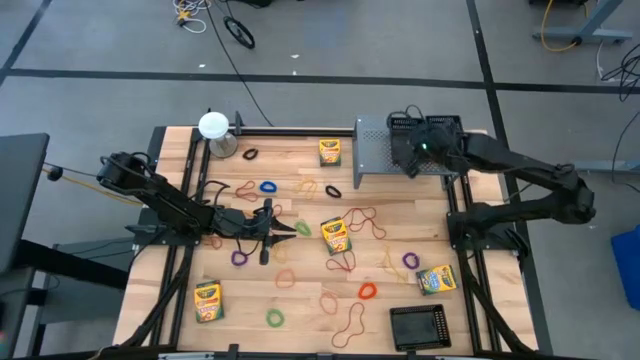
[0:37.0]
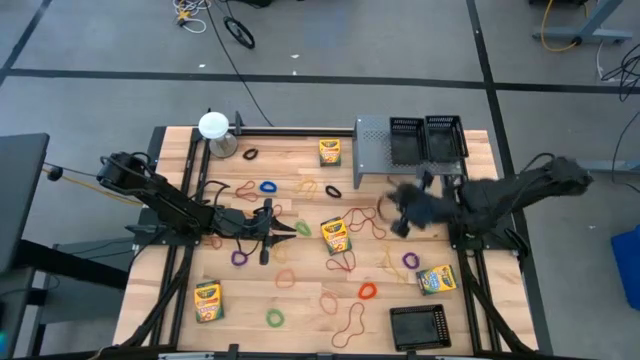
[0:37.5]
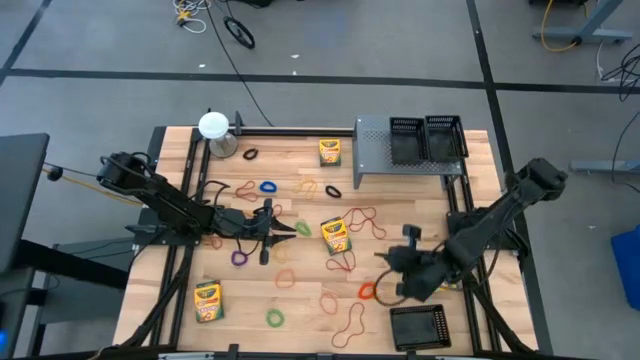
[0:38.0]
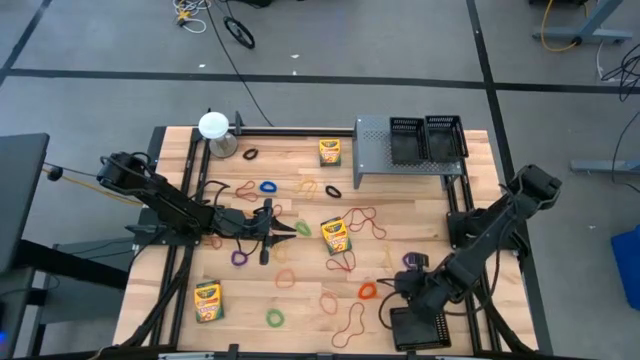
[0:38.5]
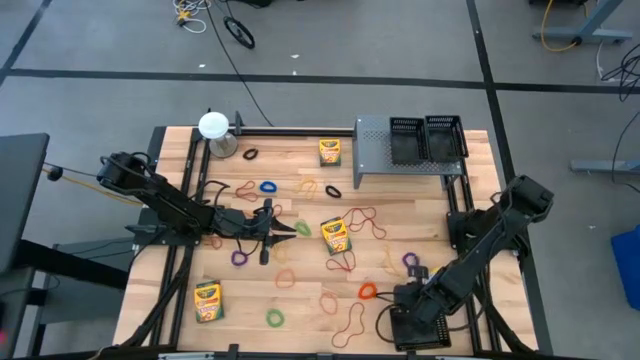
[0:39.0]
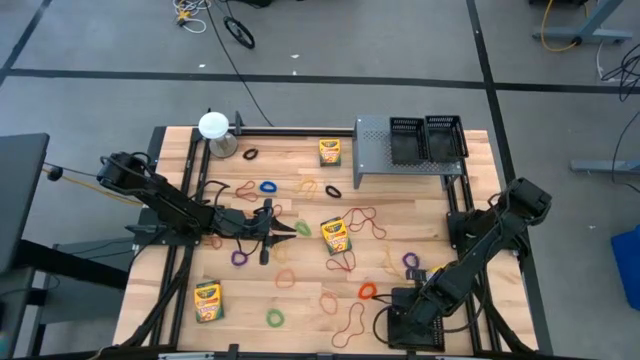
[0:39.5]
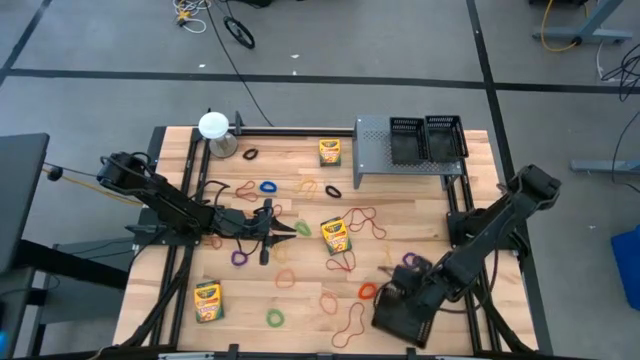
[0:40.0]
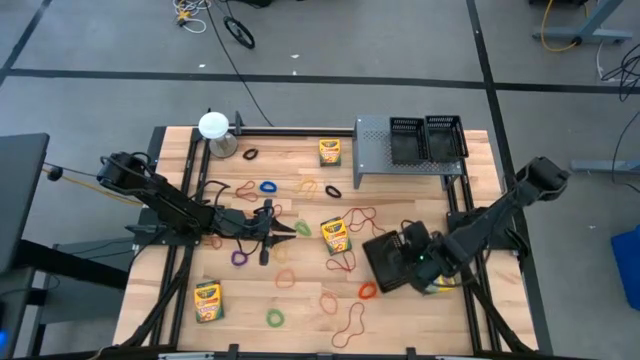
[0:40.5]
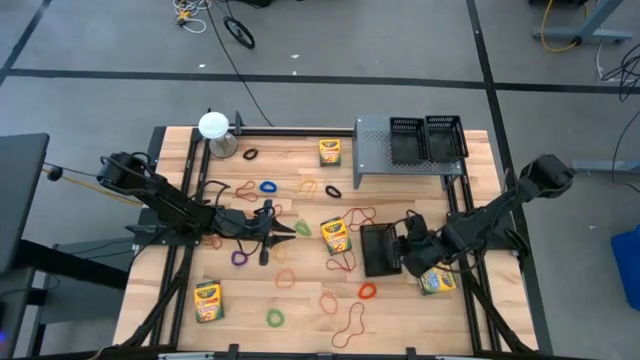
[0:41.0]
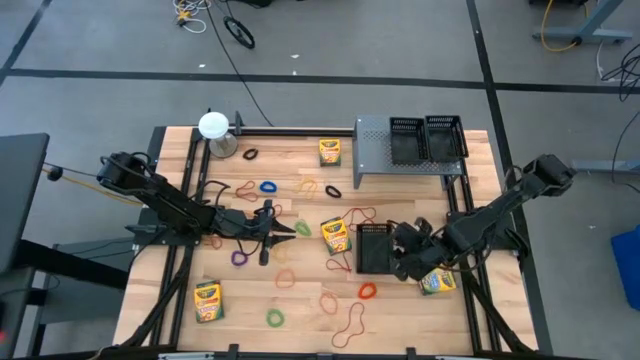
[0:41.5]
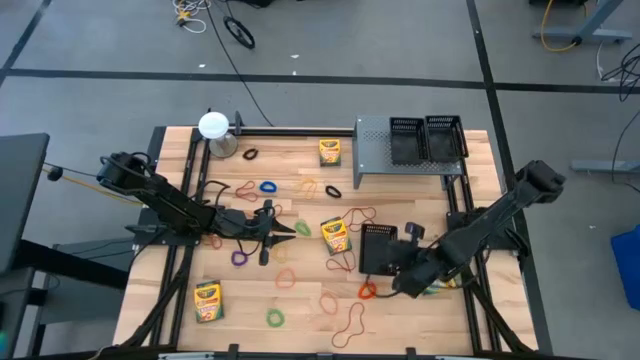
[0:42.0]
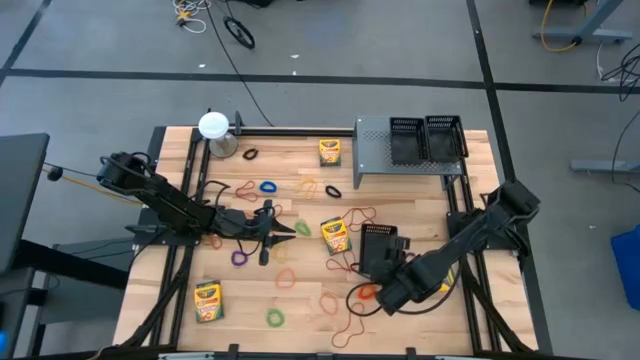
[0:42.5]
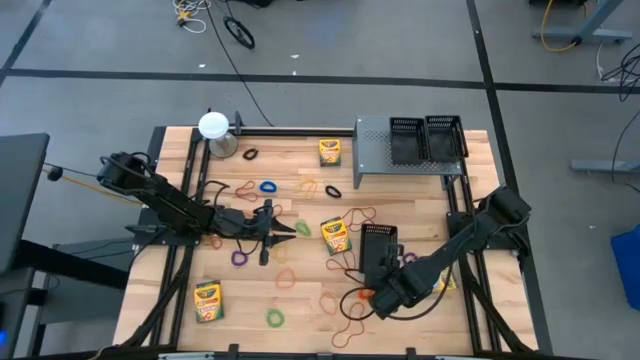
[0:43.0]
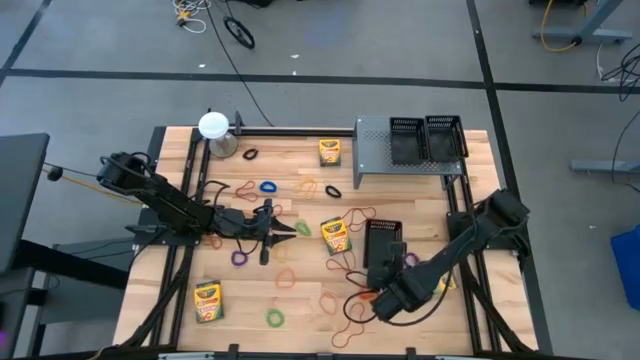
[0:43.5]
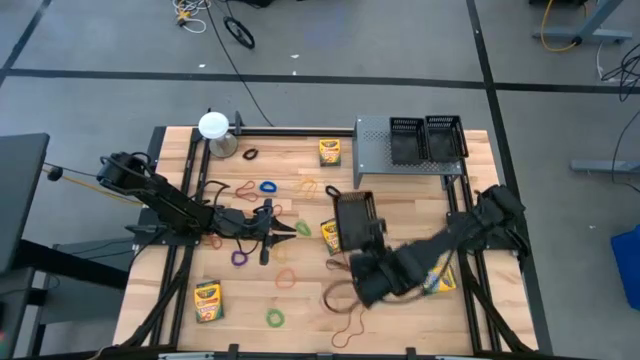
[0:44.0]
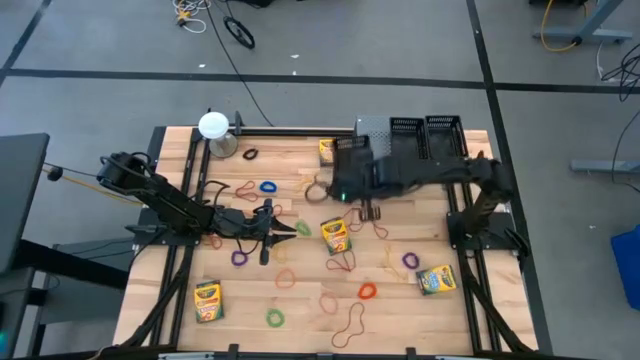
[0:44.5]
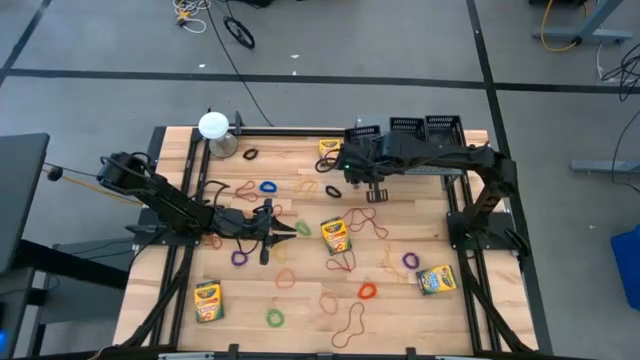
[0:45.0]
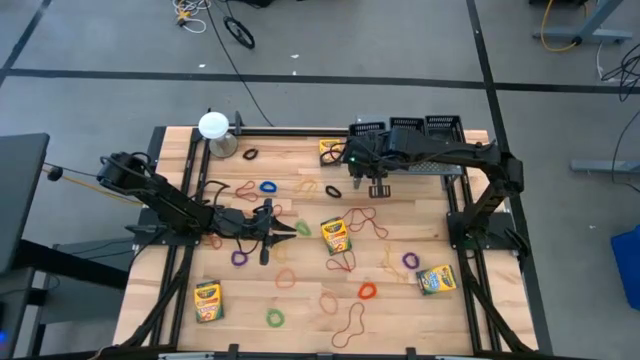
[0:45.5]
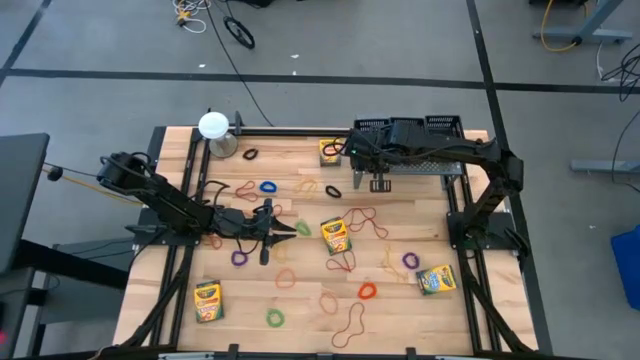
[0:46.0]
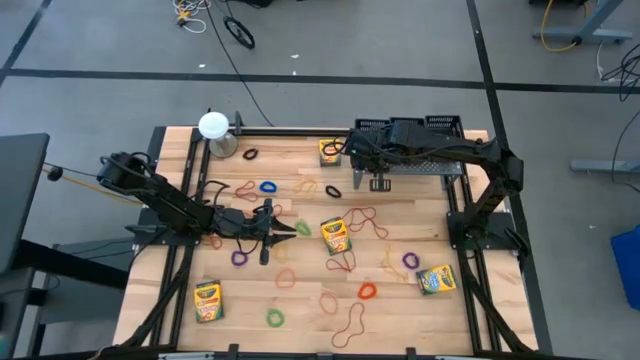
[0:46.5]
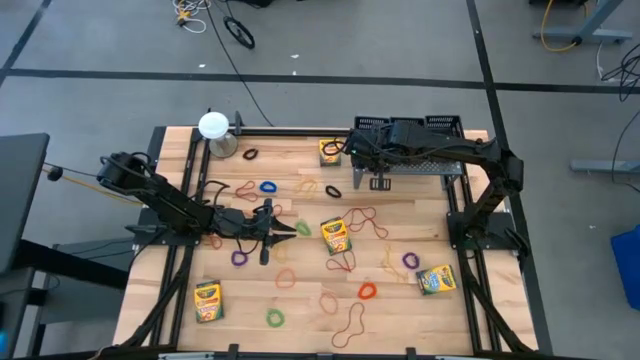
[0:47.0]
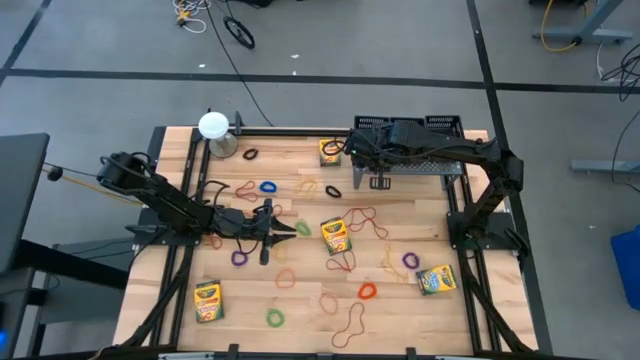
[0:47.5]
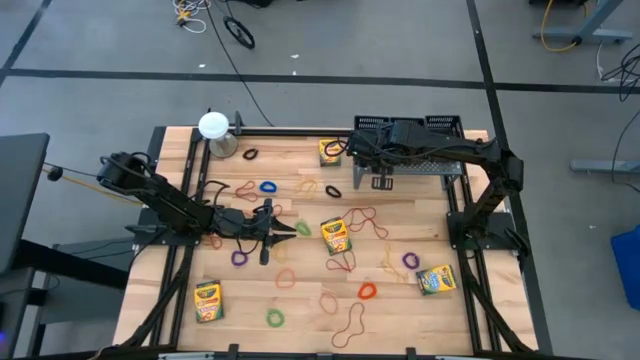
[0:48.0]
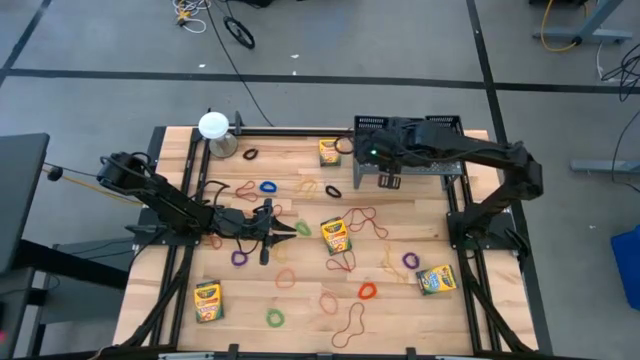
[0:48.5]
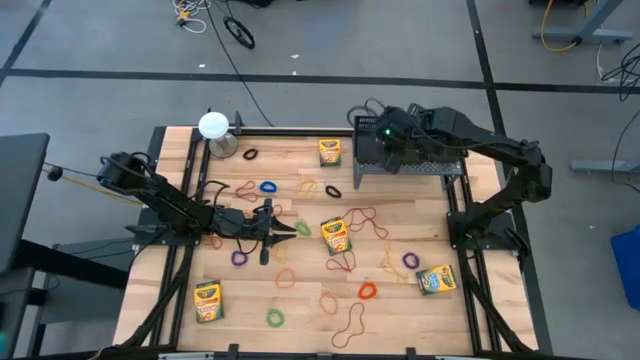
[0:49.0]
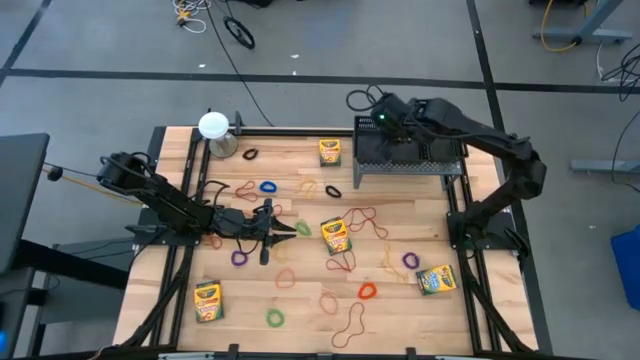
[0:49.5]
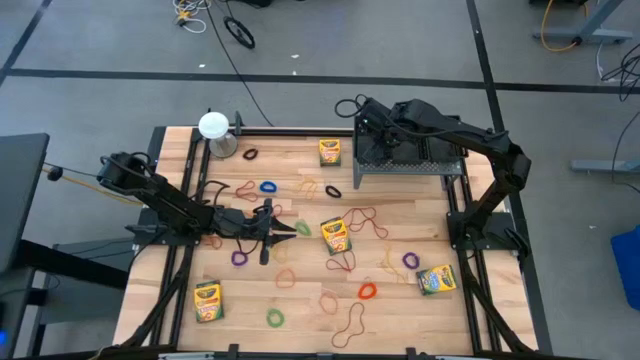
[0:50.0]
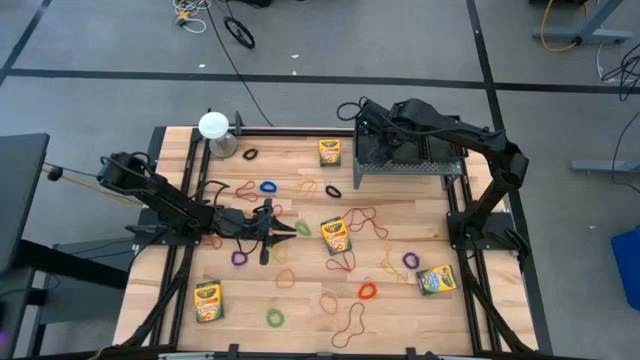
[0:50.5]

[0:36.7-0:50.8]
Task: Pick & Place Office Desk Supplies
Put the black bin on the shelf

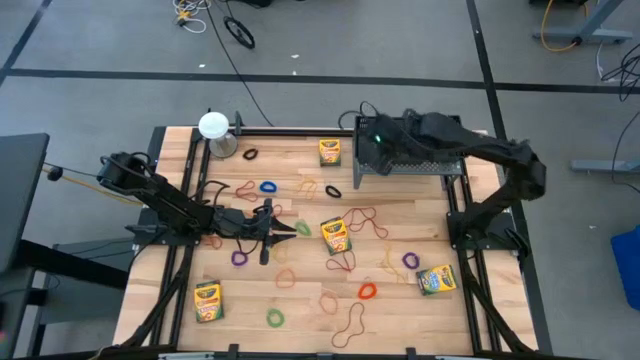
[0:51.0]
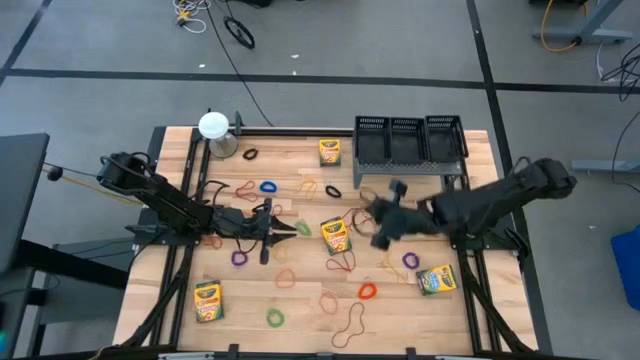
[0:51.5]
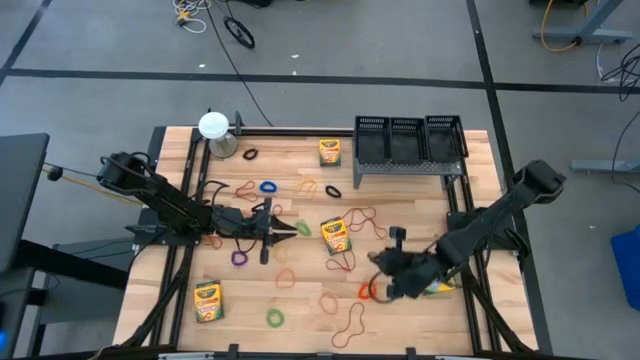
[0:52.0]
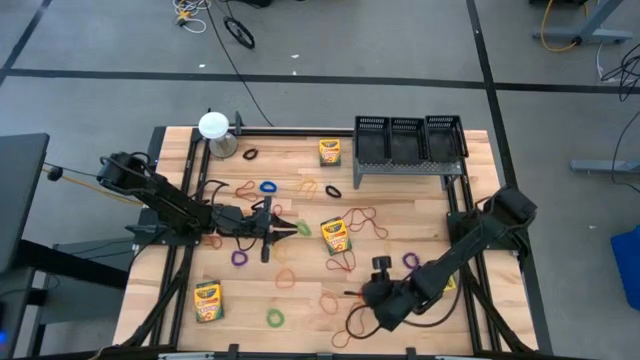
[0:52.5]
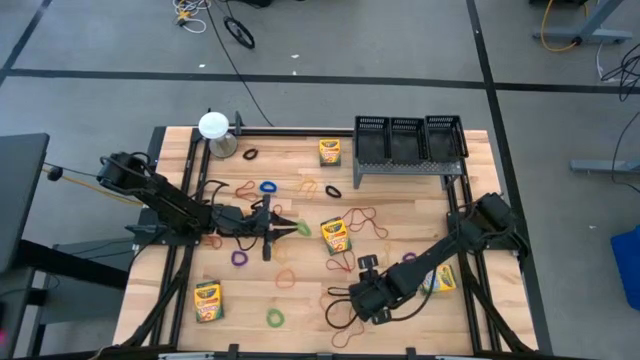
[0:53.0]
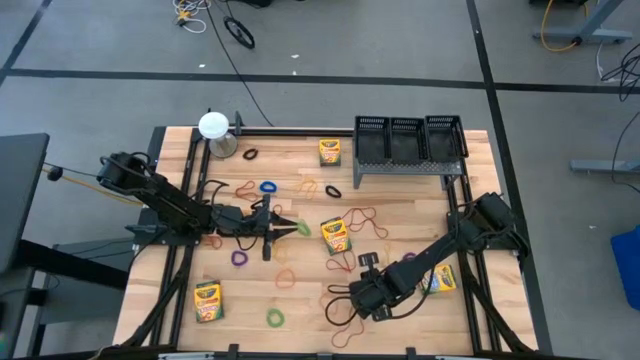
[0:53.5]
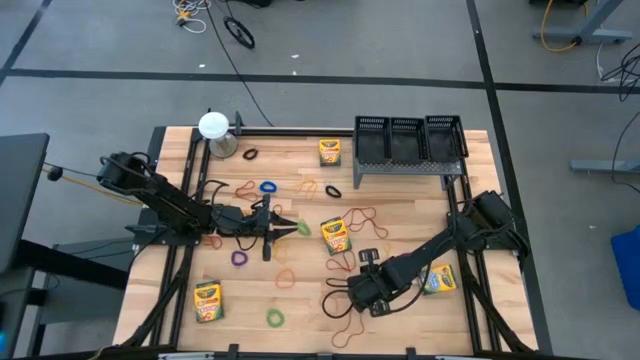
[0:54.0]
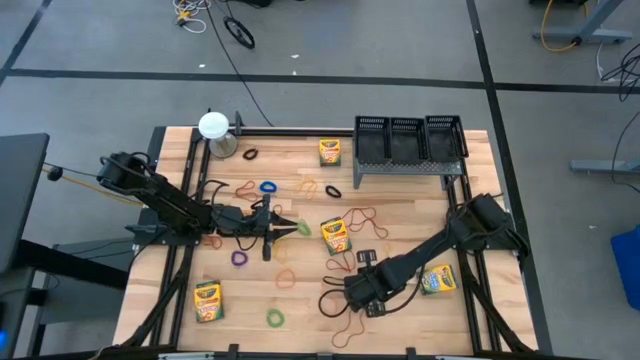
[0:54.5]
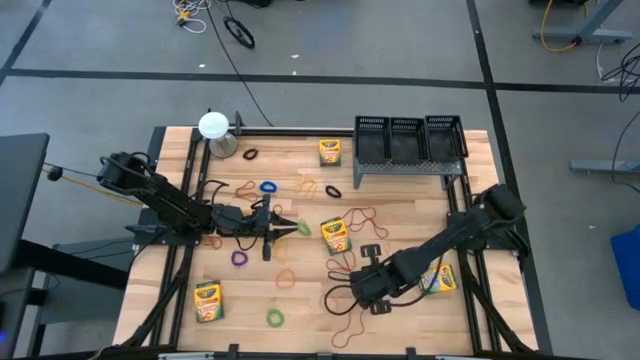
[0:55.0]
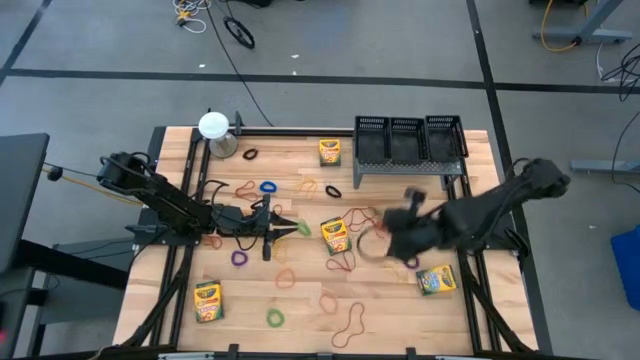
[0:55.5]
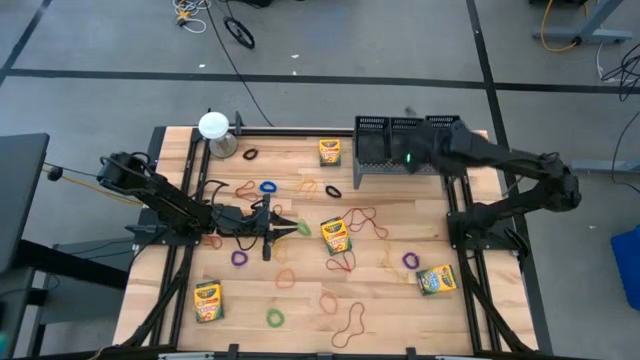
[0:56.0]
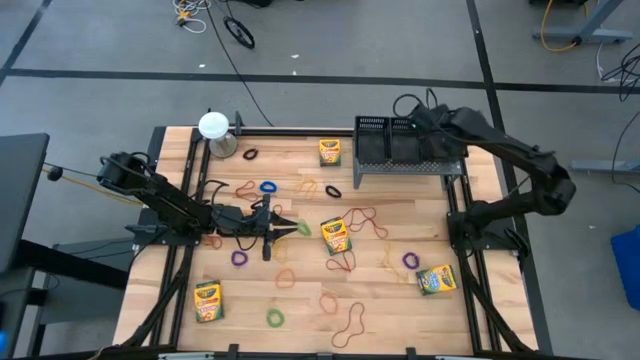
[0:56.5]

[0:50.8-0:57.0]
Put the orange spring keychain into the right black bin on the shelf

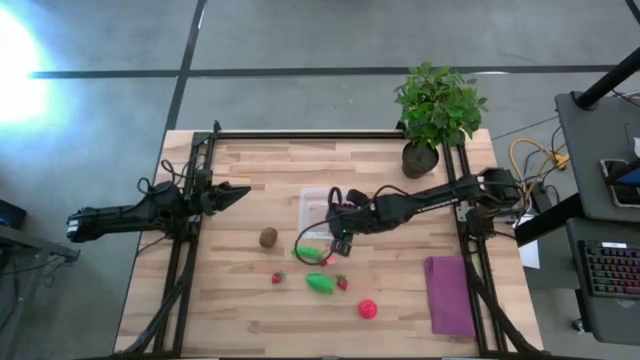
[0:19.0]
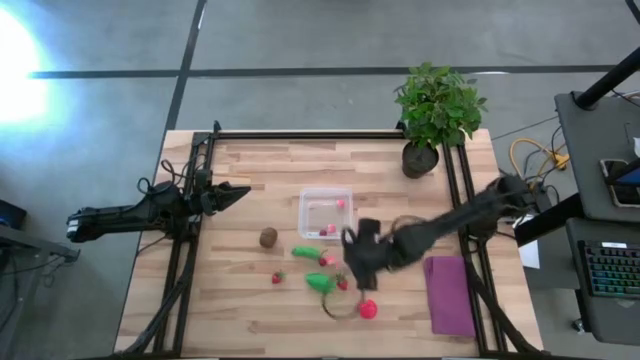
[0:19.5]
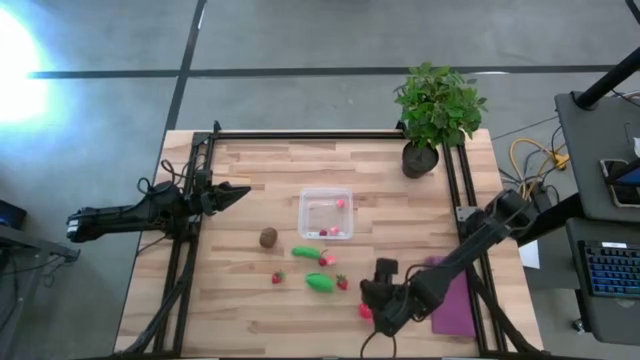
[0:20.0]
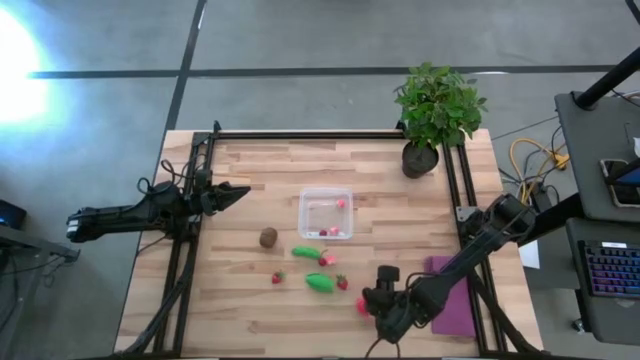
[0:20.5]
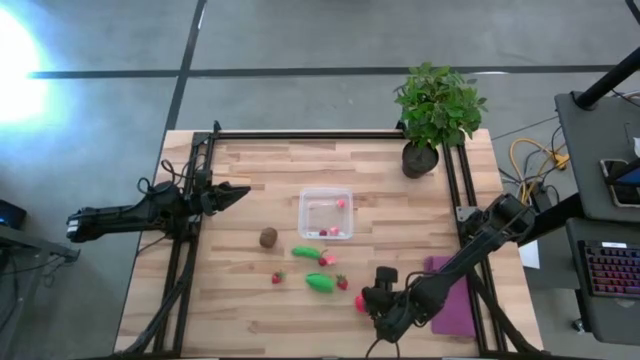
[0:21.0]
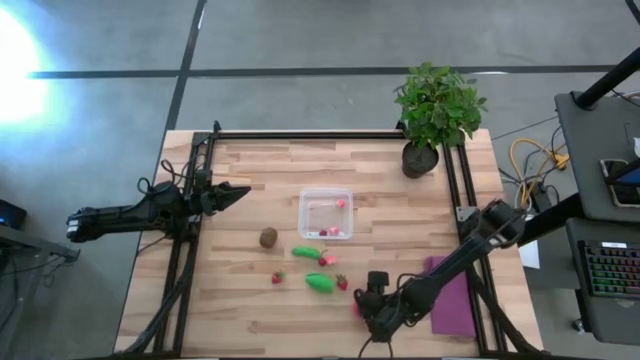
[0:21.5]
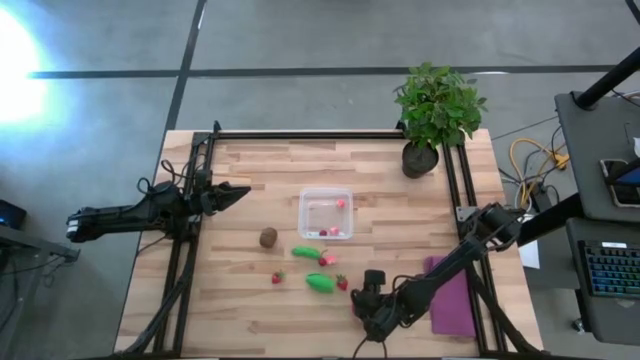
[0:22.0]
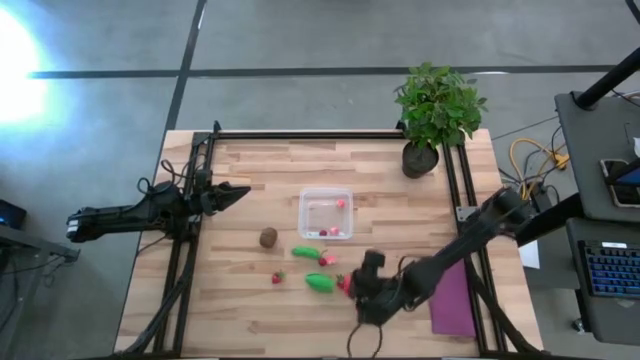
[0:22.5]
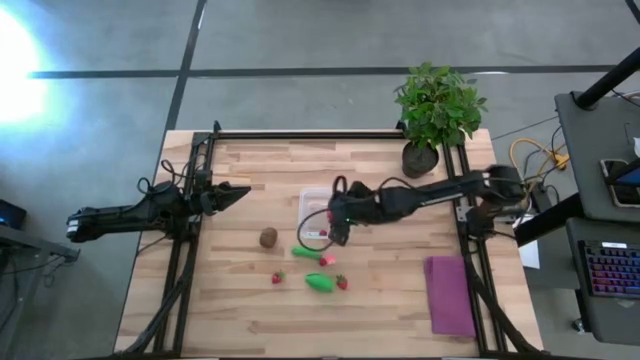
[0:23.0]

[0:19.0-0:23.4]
Task: Pick and placing Produce into tupperware
Put the red tomato into the transparent bin
